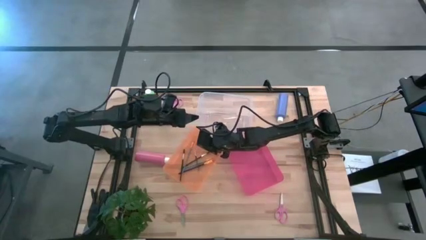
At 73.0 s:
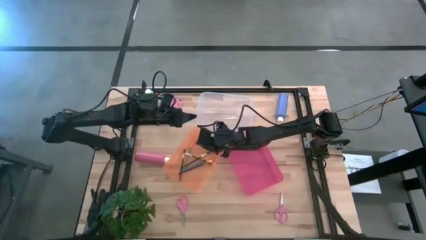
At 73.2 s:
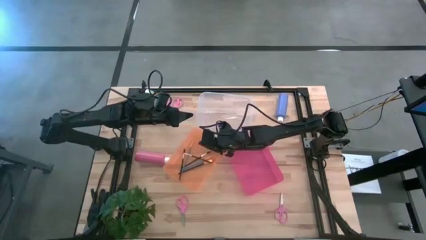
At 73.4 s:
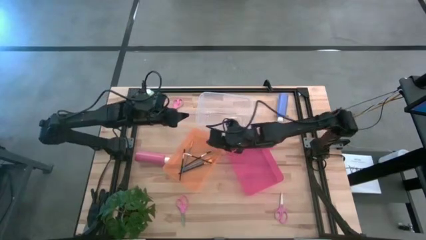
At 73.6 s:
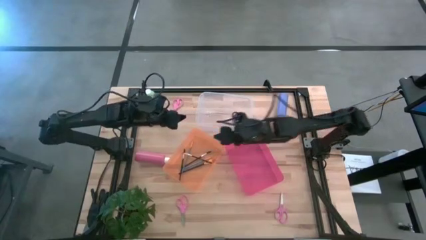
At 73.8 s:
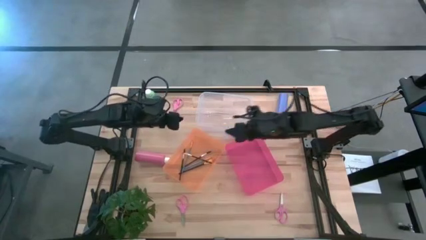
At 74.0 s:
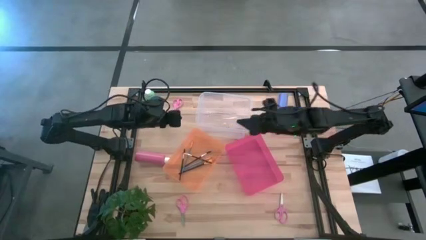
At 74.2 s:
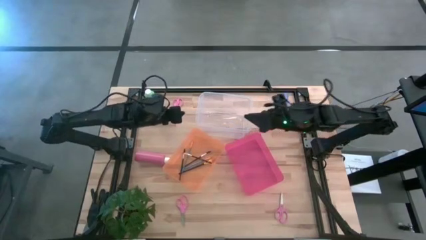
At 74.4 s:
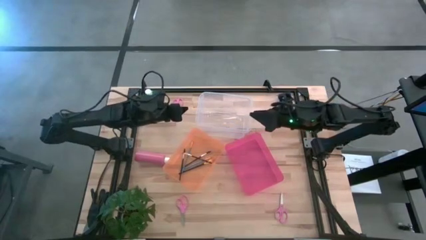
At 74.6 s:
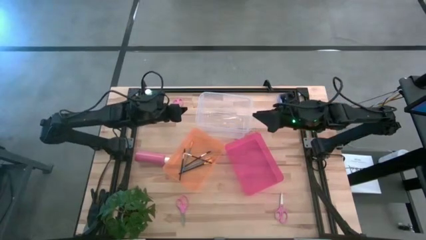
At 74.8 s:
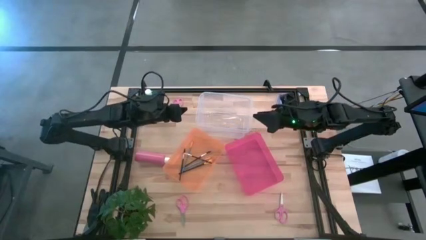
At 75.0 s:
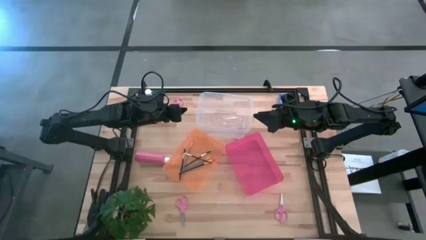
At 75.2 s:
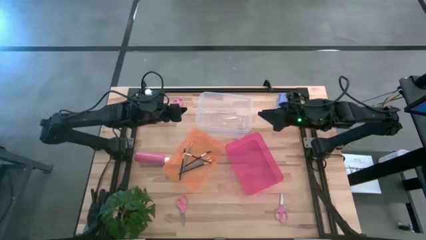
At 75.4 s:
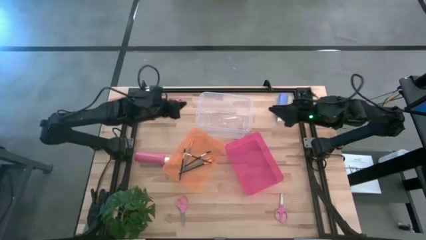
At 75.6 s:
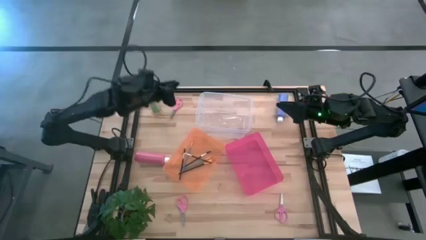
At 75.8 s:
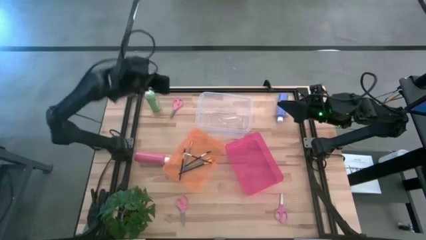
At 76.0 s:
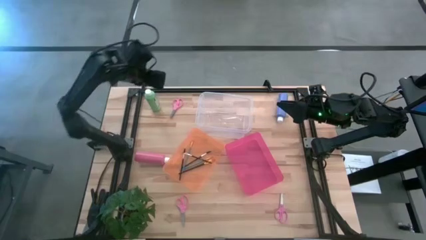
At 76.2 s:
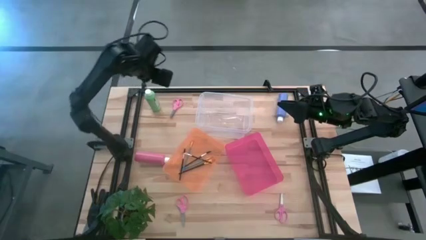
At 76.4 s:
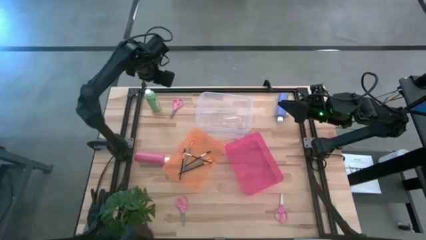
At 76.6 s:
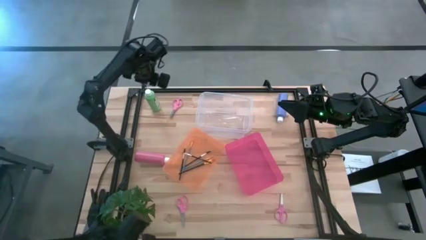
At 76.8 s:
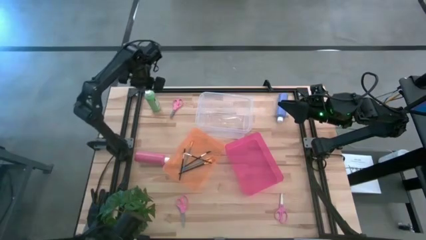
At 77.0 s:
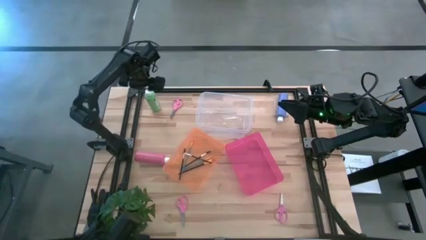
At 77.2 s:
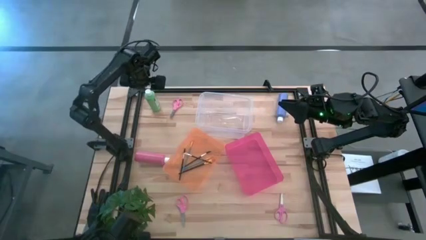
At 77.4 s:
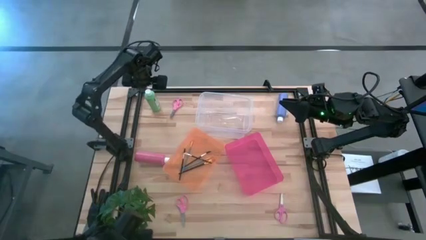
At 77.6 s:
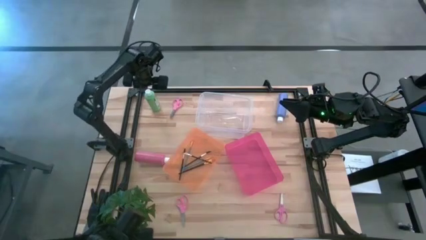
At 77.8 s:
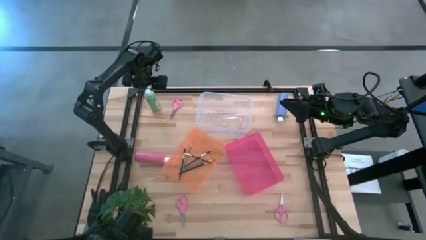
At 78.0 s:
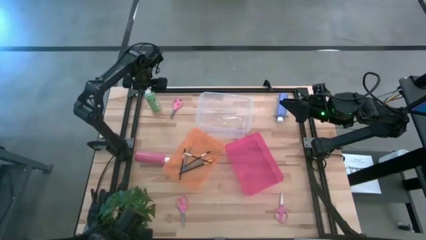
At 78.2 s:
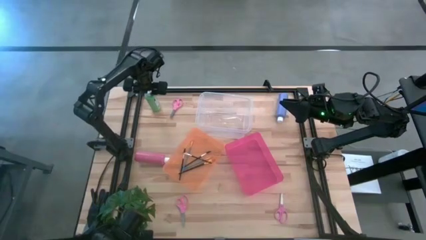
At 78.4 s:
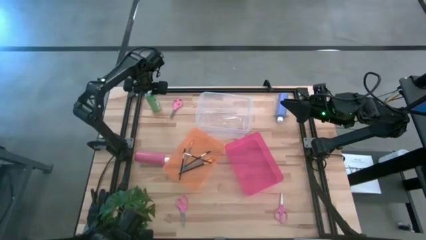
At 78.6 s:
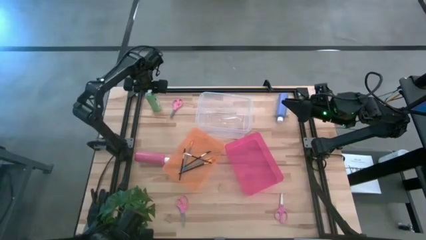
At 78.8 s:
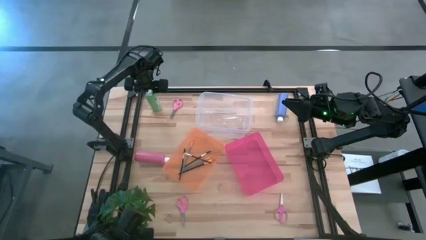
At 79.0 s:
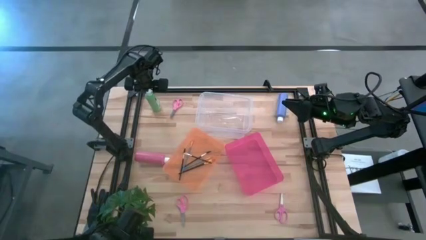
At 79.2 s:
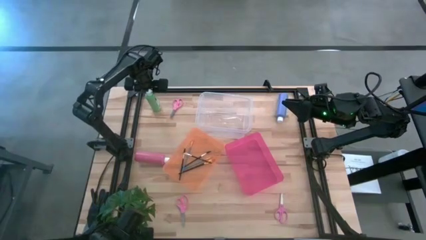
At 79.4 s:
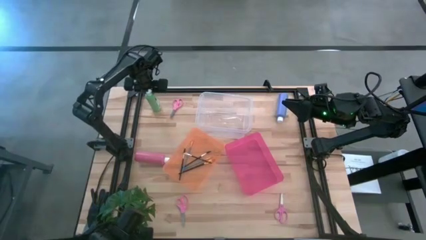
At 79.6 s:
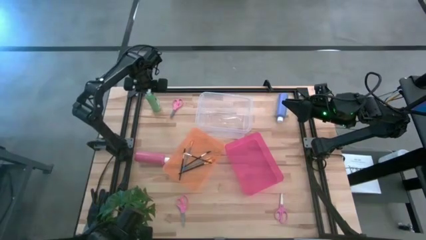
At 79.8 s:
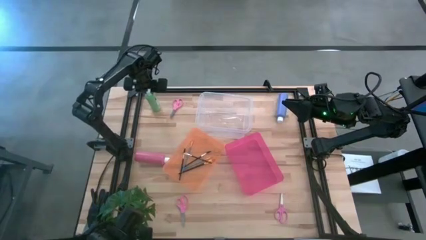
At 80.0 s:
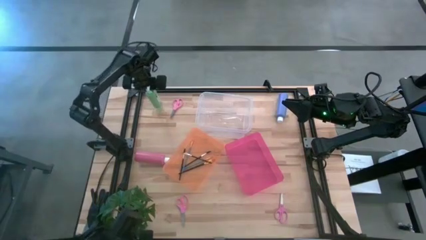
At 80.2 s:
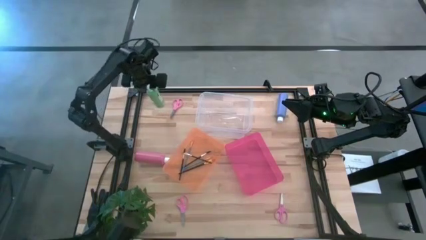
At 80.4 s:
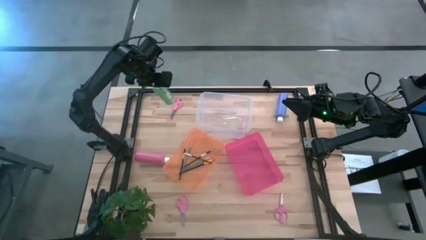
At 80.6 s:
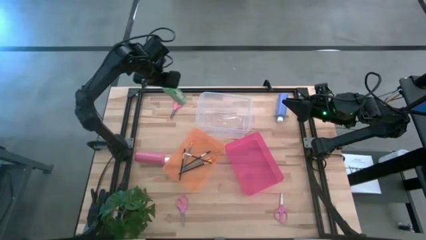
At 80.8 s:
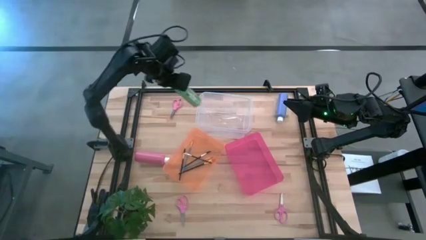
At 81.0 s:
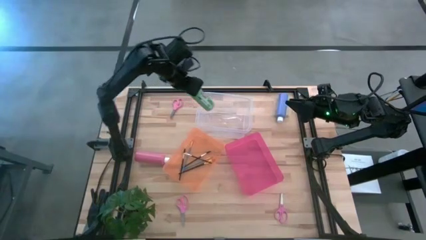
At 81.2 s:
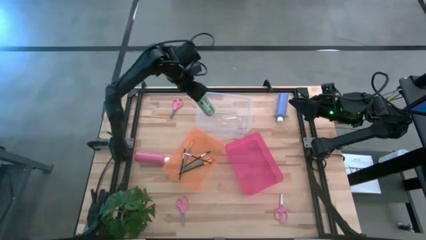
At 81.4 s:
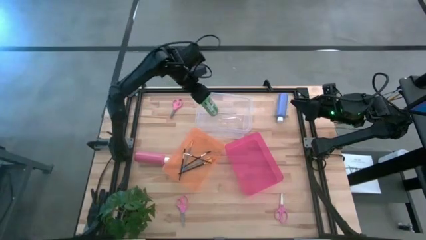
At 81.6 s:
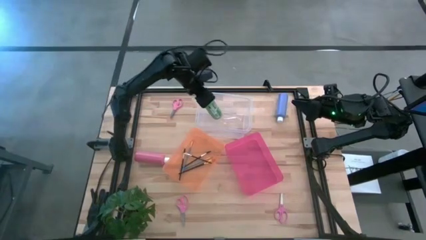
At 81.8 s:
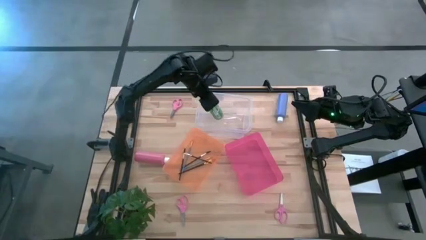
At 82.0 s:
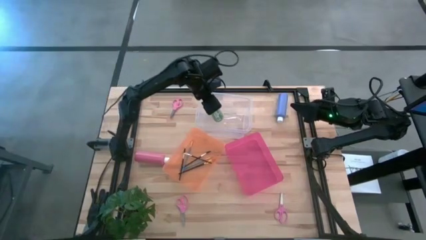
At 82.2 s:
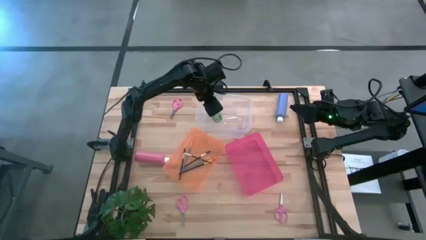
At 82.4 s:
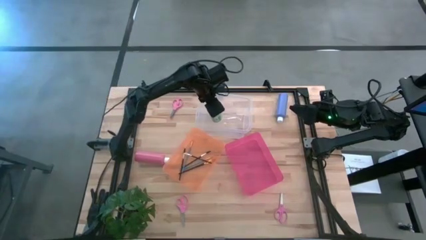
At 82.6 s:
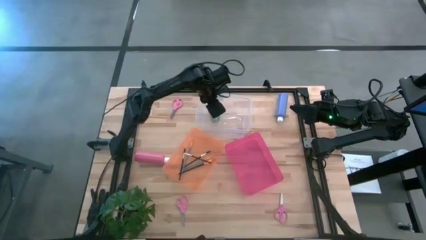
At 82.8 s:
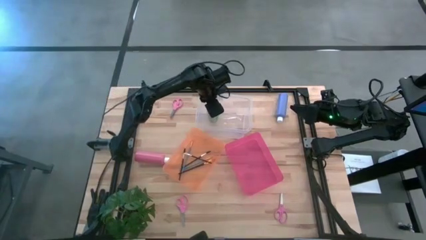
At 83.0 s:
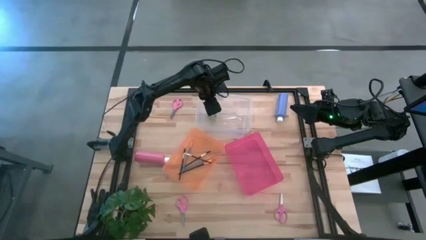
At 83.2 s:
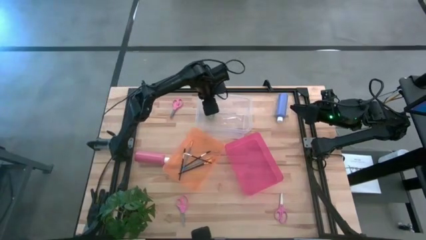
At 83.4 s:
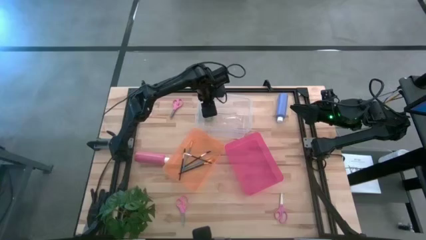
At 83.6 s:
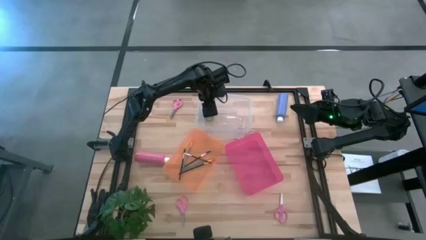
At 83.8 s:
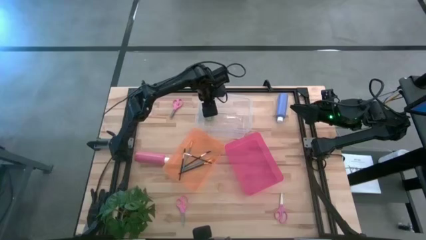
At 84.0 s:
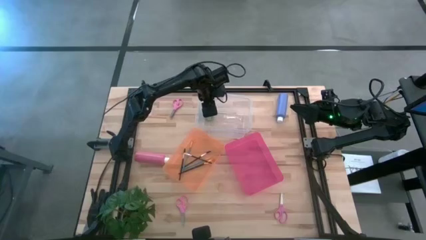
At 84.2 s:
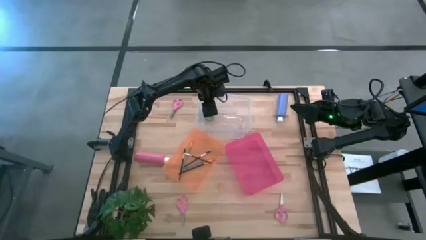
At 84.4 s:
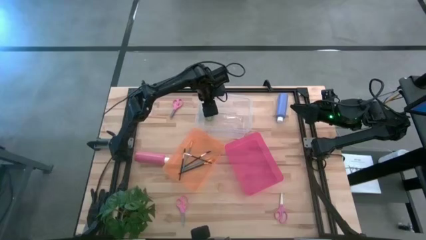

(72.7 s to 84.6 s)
Task: Pick & Place Paint Supplies
Put the green paint bottle into the transparent bin

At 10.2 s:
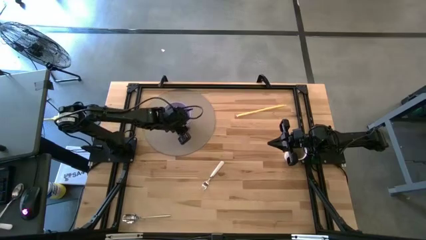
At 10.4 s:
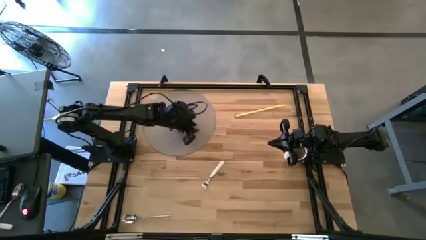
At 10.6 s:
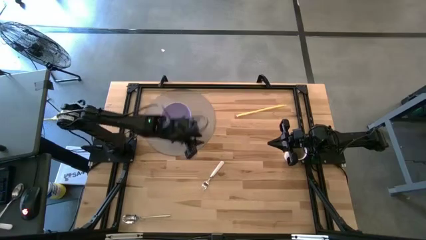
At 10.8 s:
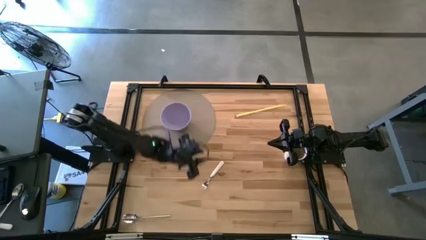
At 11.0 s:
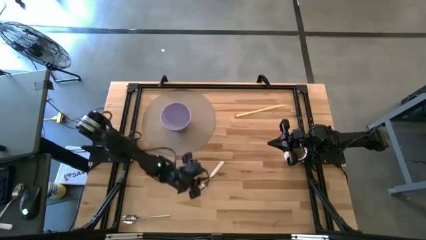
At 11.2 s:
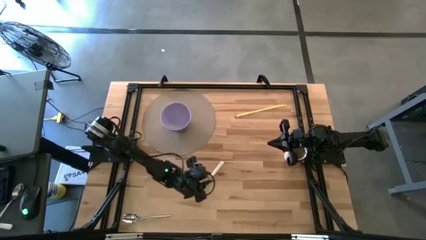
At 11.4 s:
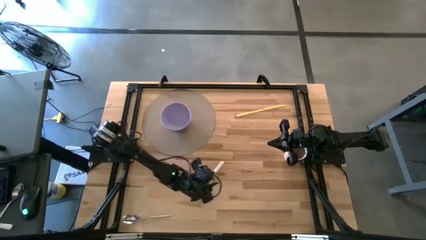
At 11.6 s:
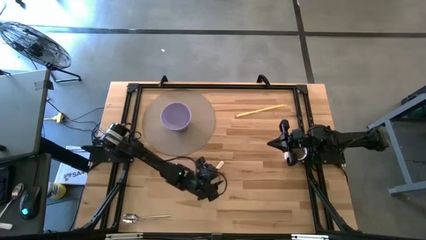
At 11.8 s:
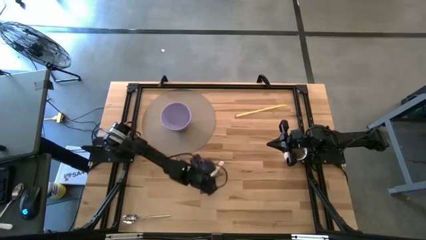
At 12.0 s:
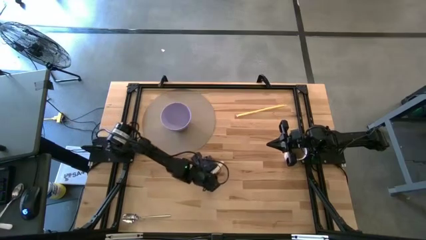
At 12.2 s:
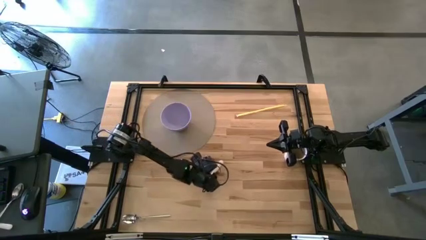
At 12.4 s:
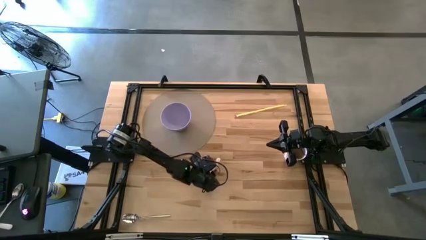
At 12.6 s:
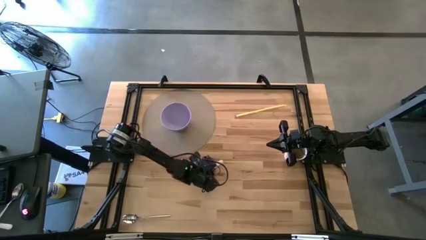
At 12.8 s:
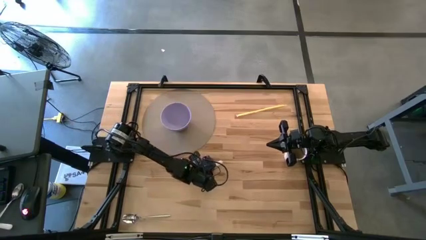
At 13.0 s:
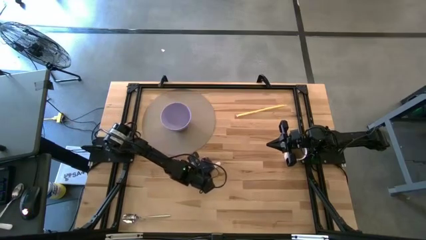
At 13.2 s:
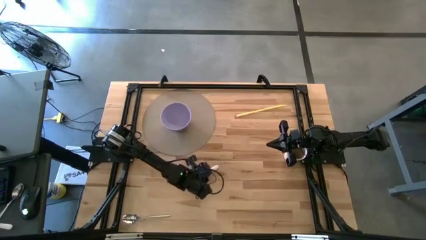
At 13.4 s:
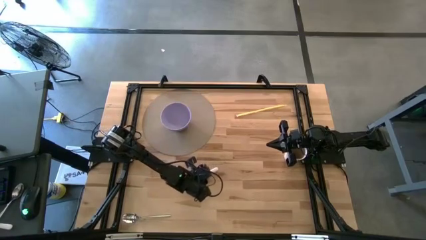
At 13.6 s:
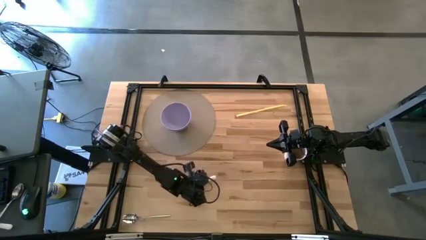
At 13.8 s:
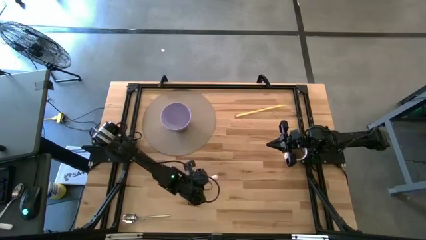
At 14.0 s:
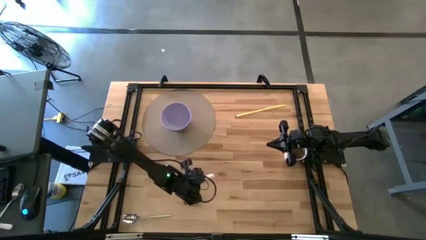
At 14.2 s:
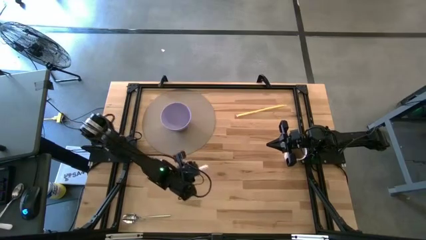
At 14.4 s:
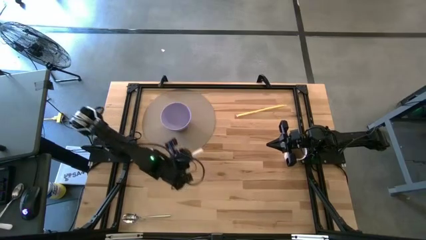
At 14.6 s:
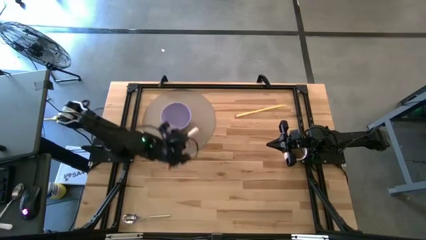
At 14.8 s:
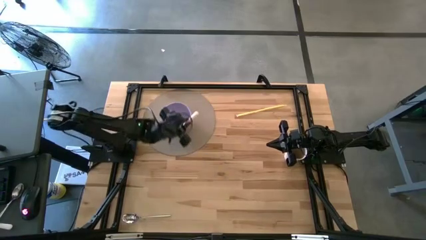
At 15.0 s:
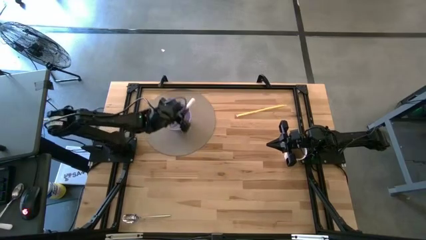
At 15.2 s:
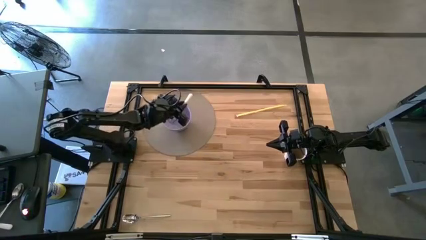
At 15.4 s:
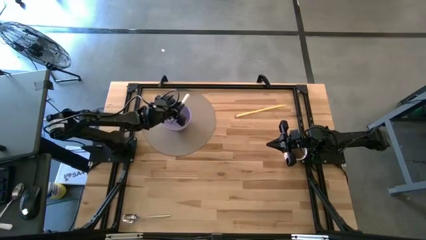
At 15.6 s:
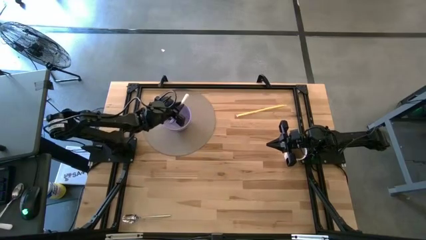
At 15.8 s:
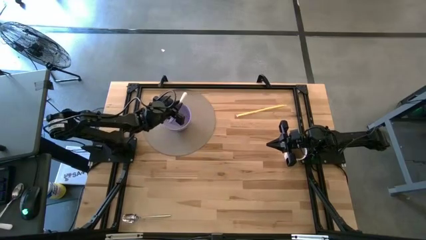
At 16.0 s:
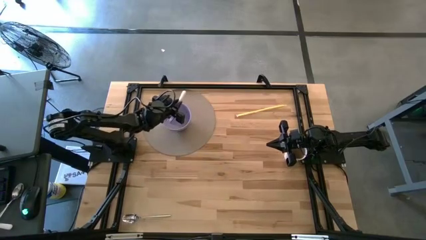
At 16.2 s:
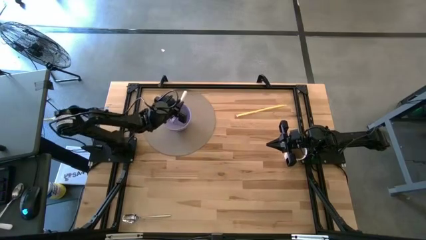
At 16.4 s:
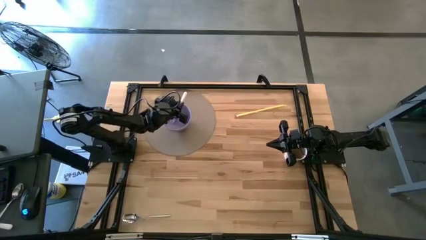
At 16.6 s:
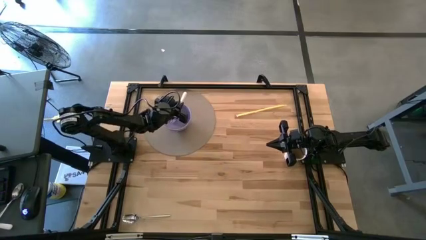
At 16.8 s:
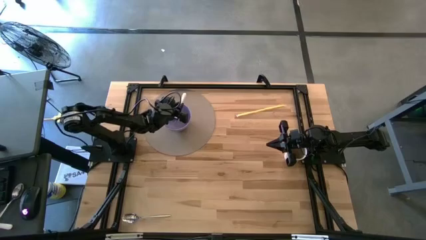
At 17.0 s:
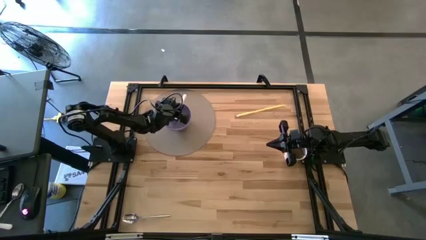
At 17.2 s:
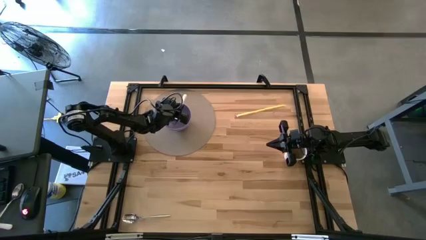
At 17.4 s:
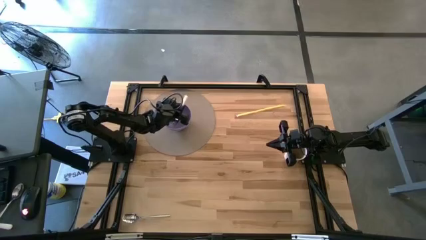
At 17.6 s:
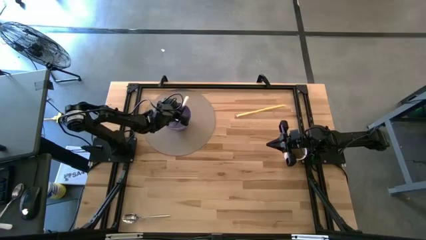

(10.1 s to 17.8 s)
Task: Pick & Place Utensil
Put the white fork into the violet bowl on the brown mat
